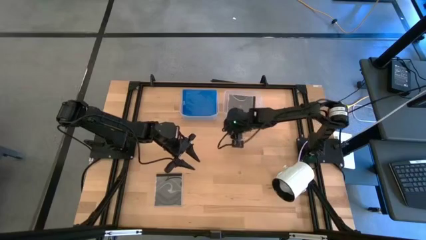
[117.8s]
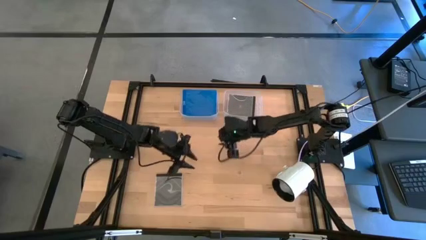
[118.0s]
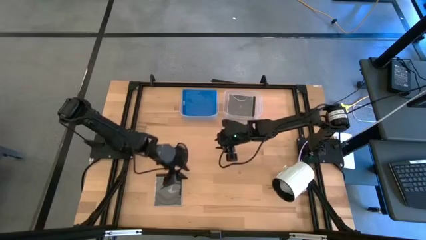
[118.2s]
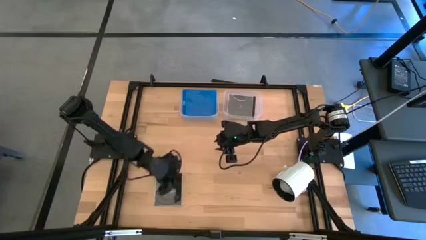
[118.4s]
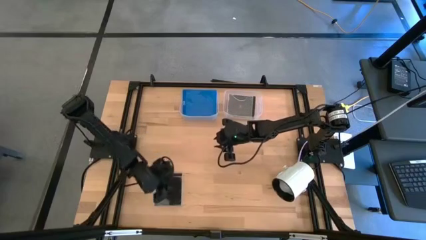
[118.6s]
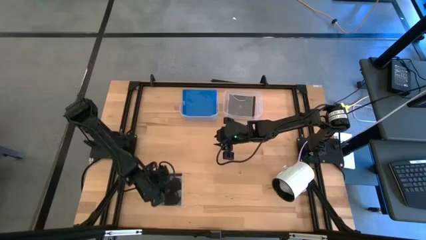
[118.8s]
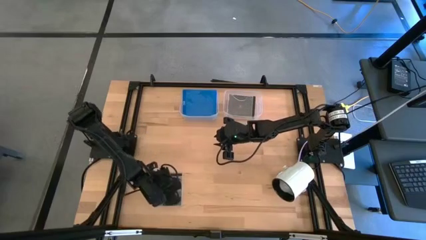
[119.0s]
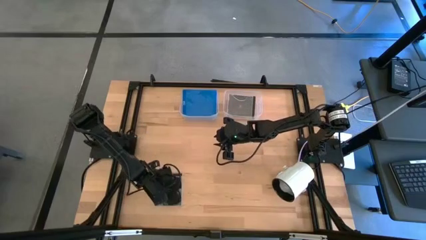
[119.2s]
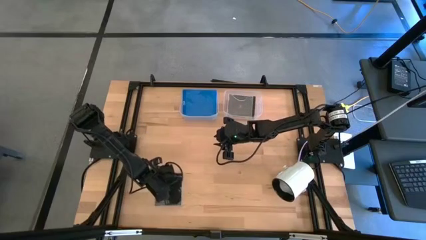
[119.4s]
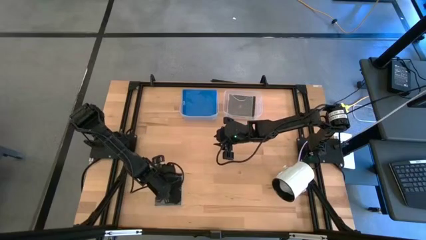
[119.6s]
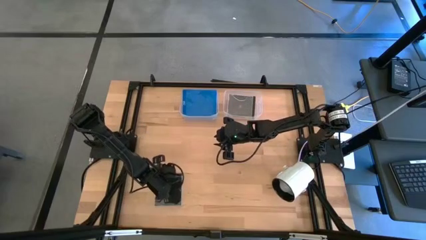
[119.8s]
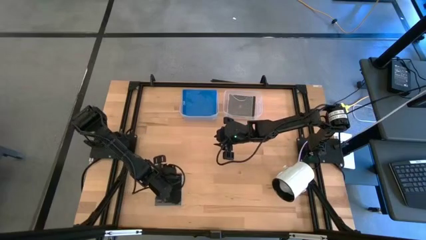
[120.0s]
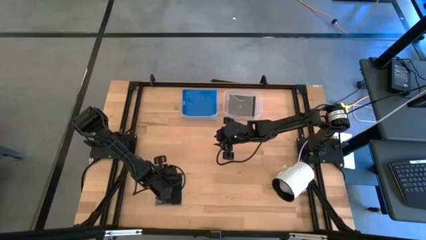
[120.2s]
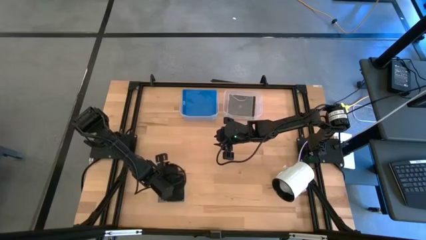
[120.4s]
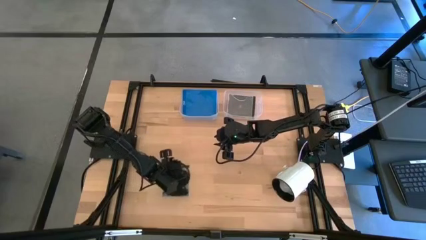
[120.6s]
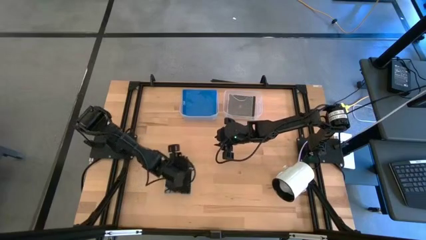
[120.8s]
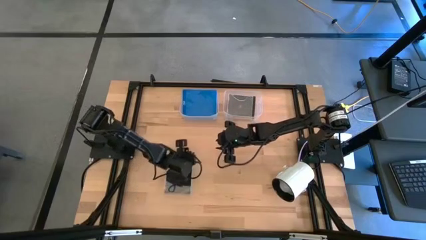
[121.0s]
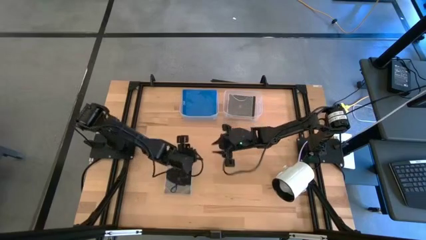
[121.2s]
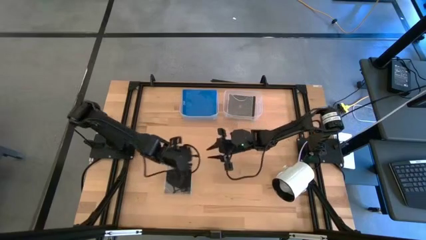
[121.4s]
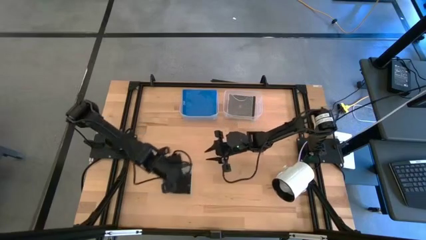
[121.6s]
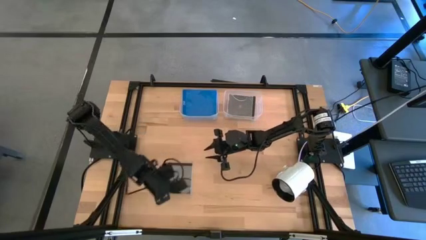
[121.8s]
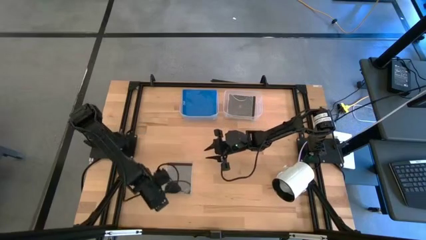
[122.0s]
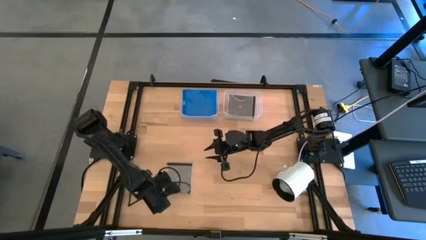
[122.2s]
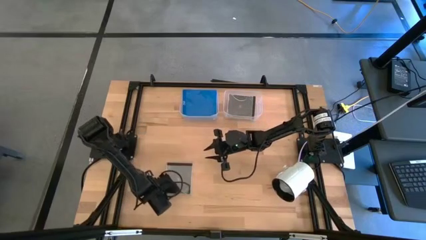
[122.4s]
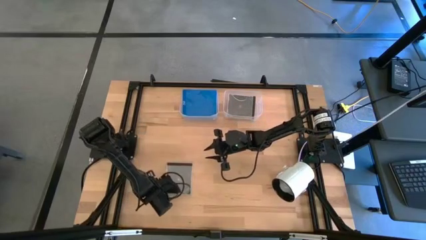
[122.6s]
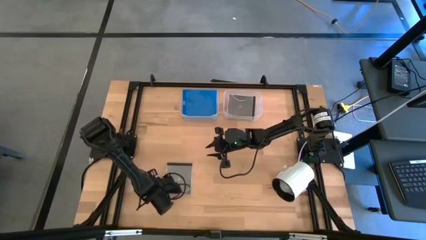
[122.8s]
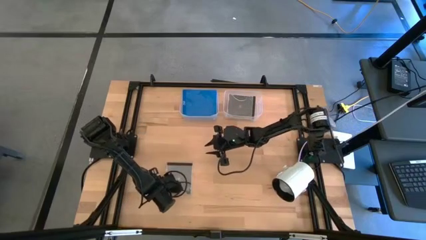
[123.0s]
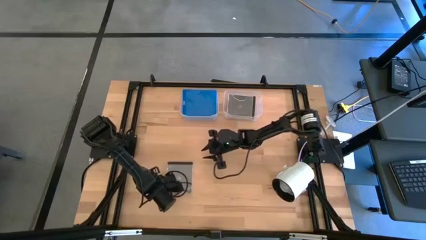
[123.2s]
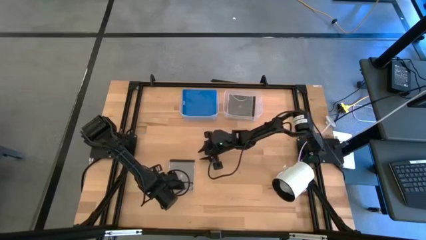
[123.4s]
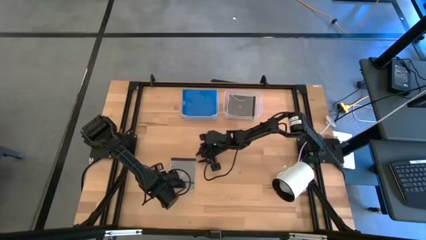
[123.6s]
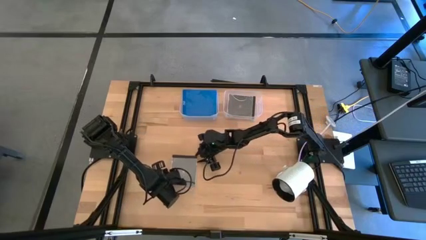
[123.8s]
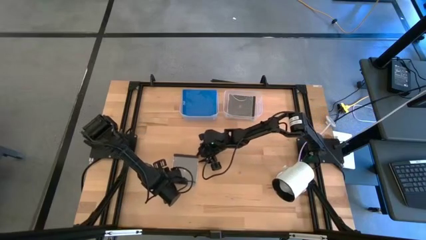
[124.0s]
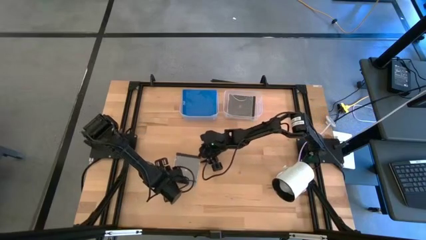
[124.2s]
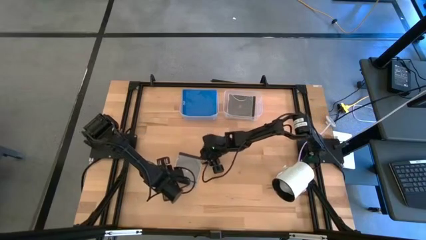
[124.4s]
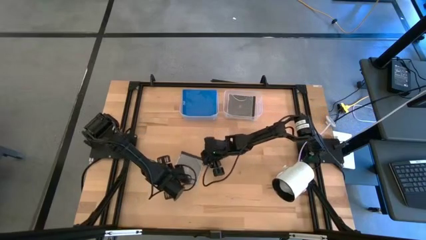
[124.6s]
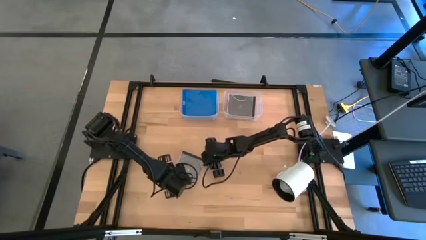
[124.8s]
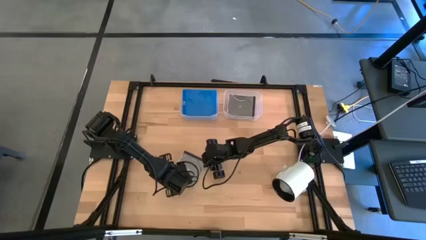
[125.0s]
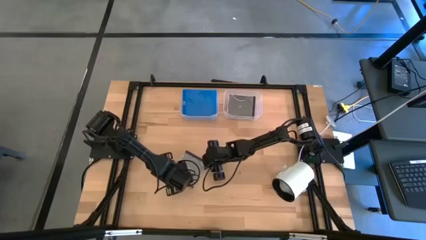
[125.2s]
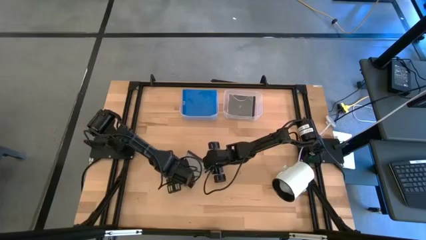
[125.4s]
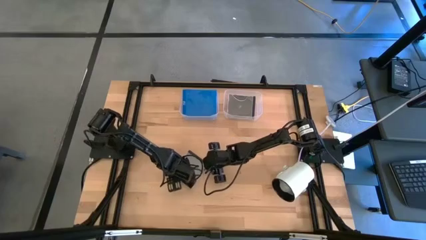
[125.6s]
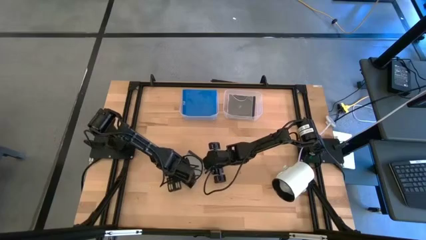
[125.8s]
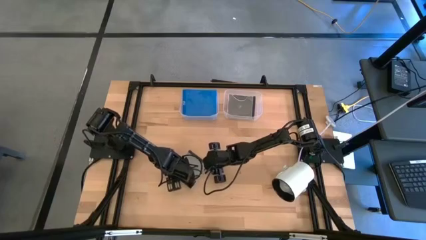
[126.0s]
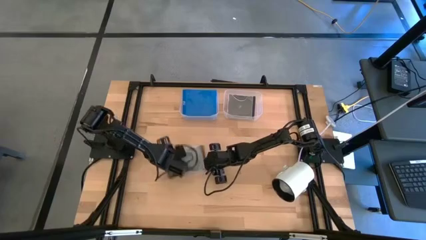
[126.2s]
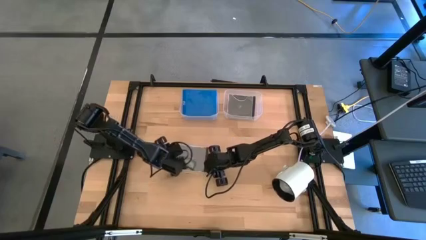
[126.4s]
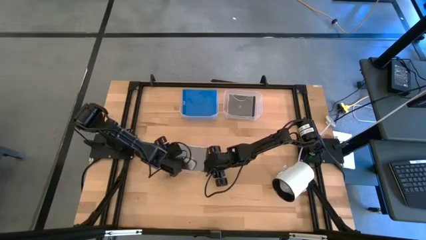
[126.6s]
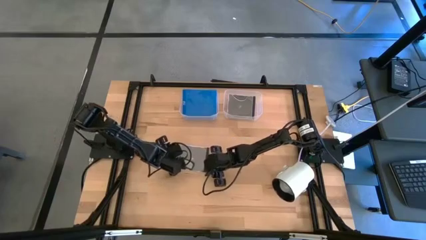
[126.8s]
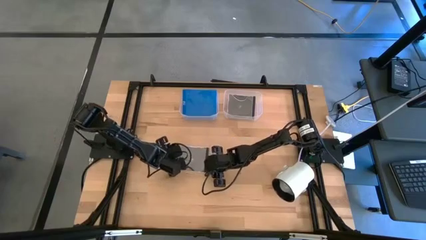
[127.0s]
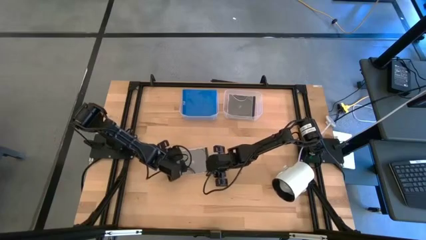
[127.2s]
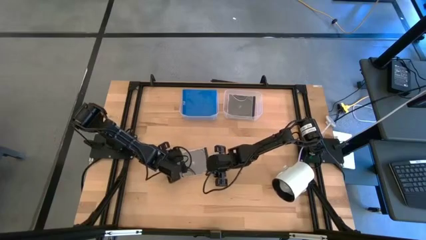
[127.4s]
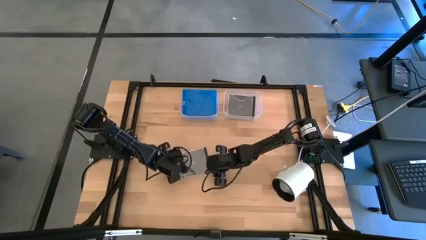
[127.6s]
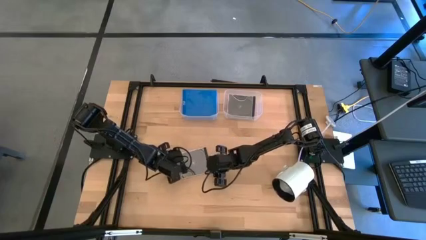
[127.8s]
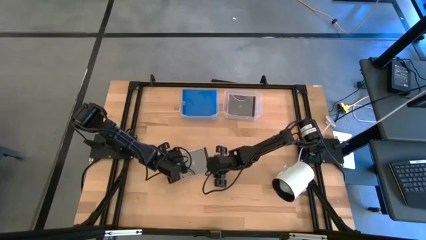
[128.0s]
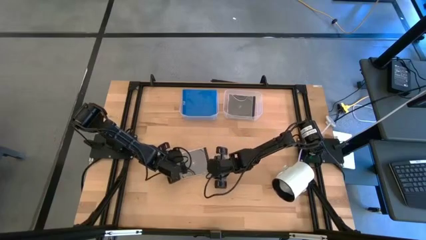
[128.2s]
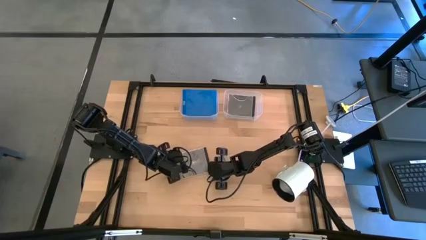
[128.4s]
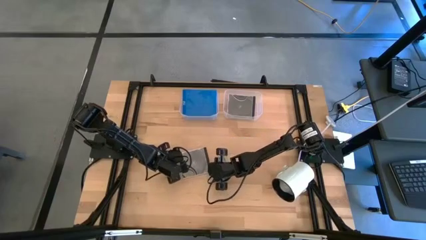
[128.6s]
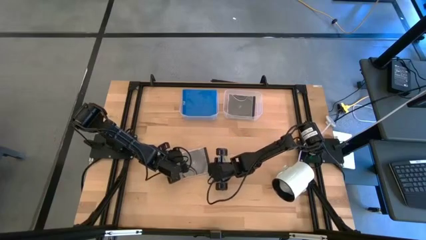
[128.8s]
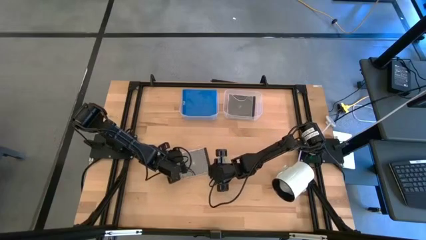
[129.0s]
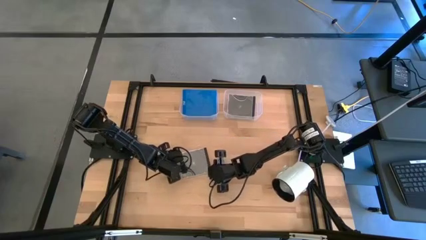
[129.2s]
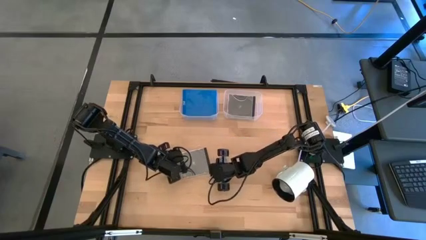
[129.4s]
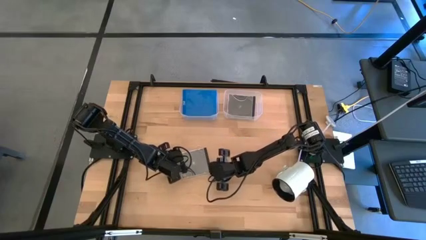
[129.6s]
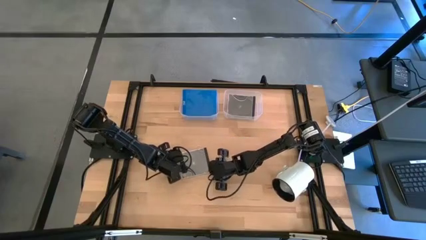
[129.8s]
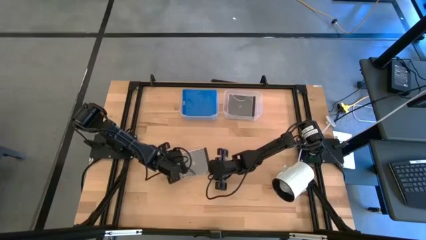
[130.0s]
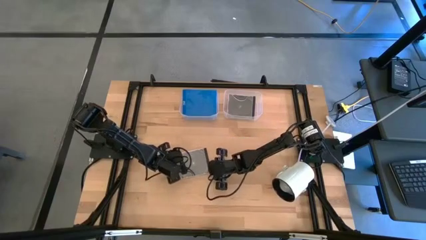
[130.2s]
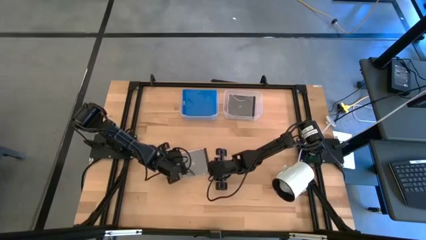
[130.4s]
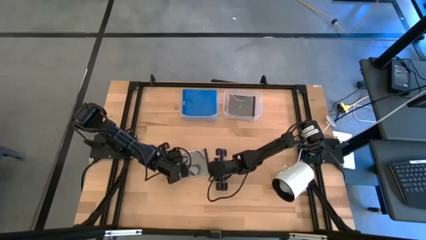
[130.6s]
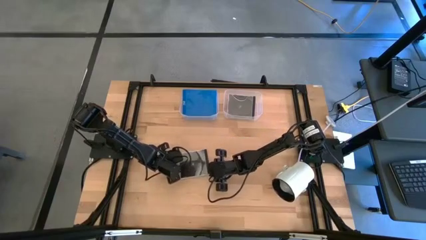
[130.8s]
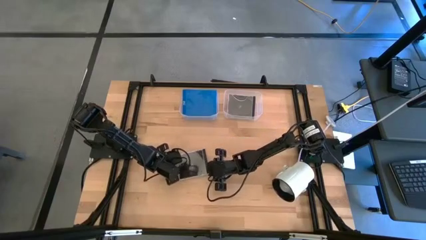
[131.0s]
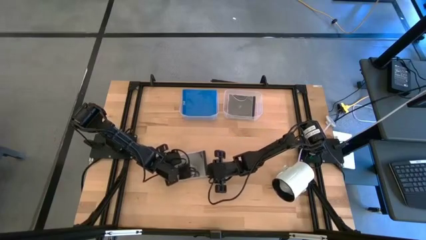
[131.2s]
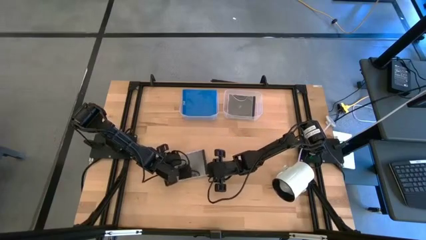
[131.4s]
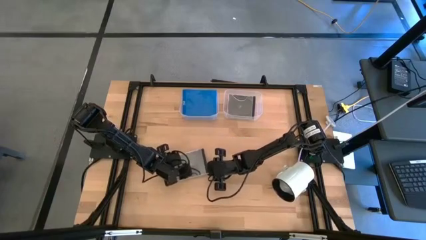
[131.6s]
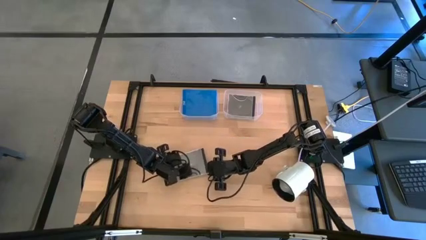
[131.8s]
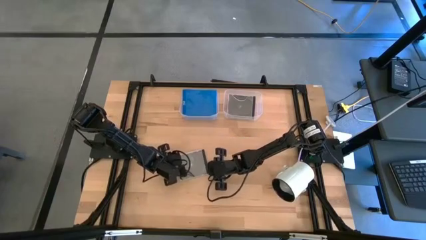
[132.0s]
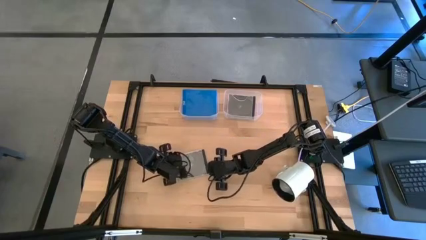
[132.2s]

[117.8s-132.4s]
Task: Pick & place jewel cases by type
Put the black CD case into the transparent bin
